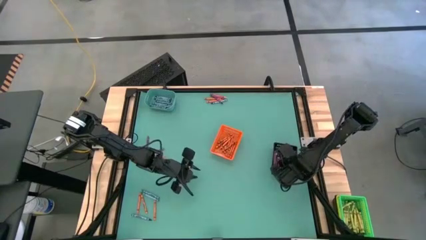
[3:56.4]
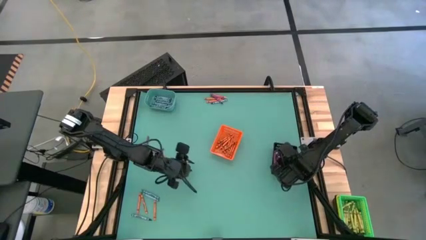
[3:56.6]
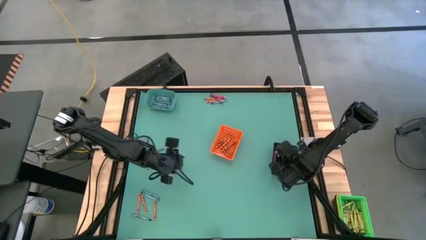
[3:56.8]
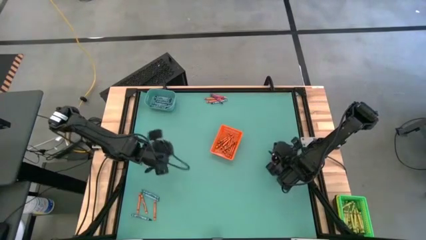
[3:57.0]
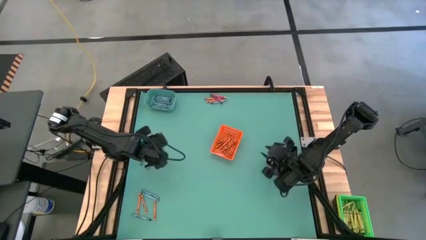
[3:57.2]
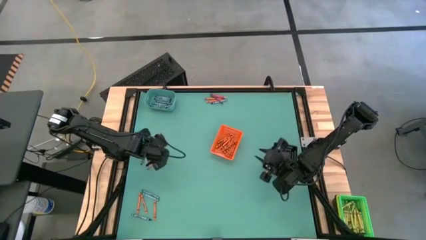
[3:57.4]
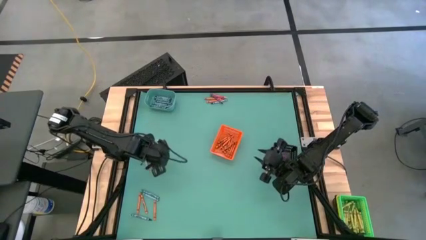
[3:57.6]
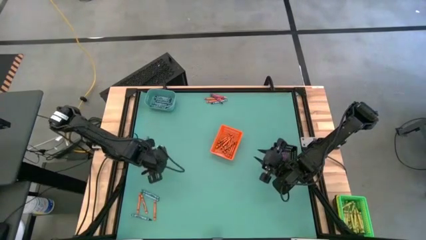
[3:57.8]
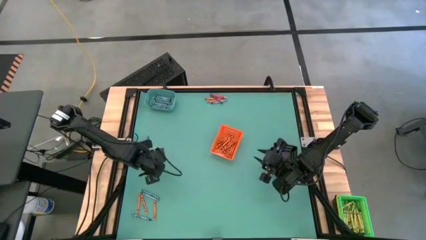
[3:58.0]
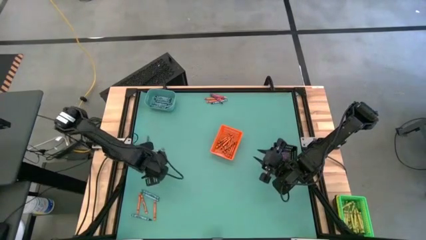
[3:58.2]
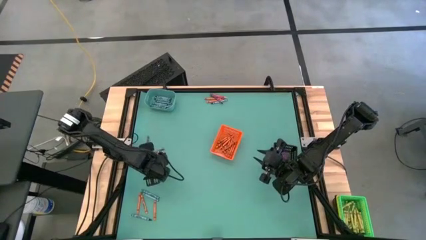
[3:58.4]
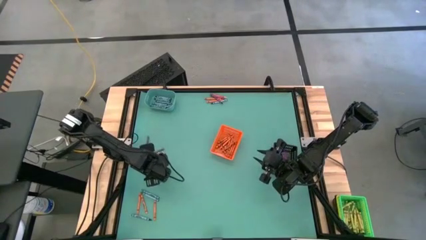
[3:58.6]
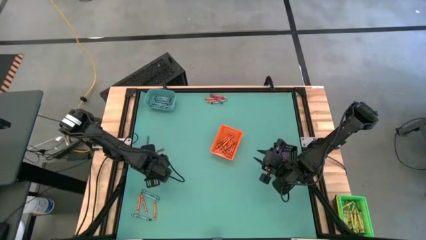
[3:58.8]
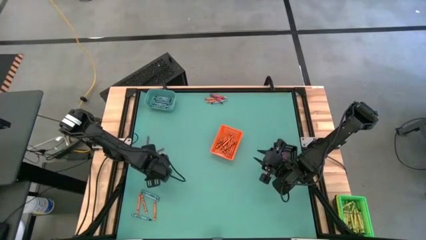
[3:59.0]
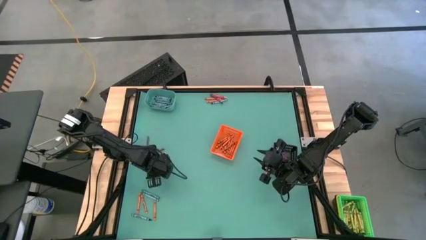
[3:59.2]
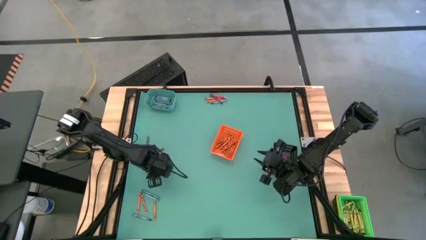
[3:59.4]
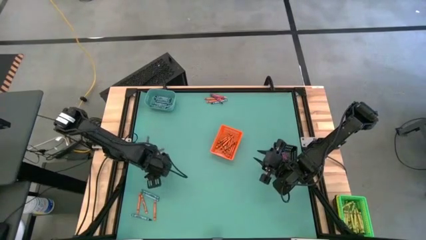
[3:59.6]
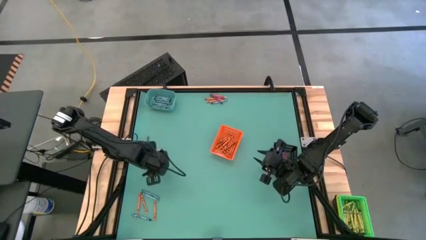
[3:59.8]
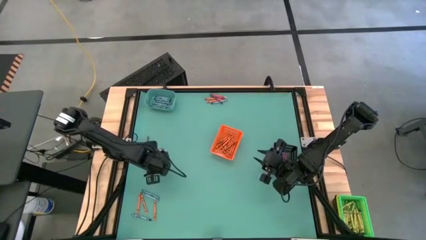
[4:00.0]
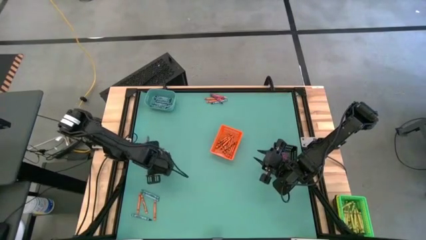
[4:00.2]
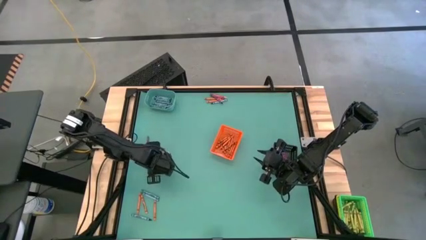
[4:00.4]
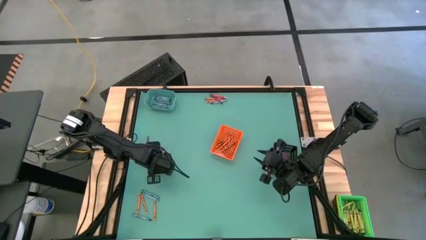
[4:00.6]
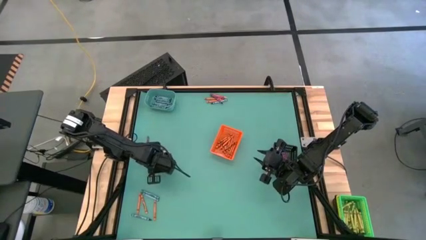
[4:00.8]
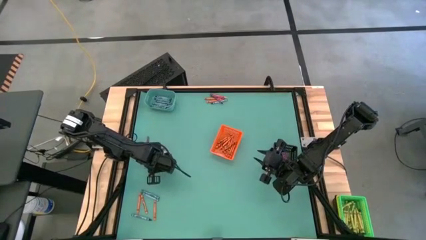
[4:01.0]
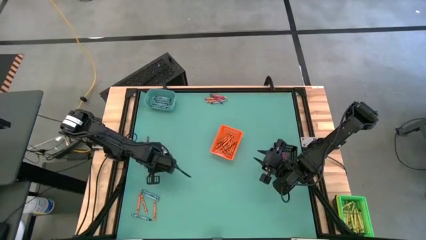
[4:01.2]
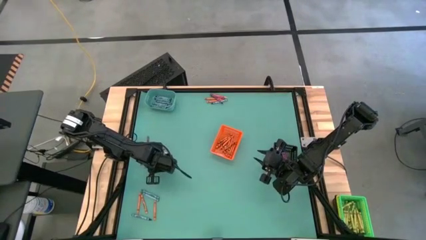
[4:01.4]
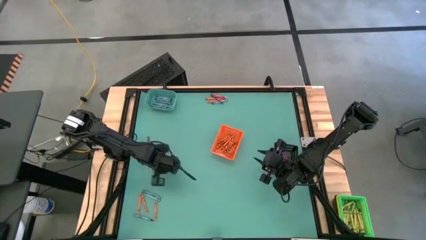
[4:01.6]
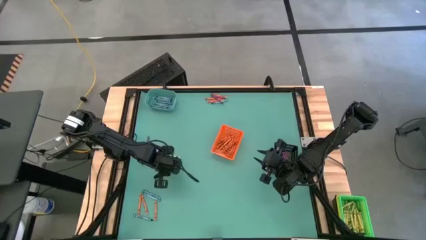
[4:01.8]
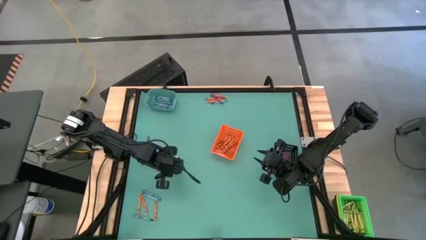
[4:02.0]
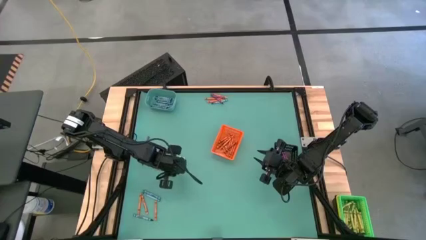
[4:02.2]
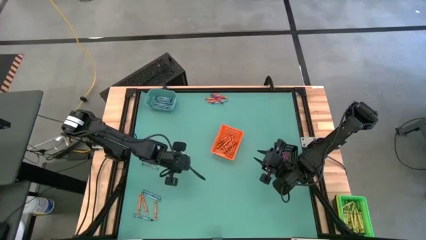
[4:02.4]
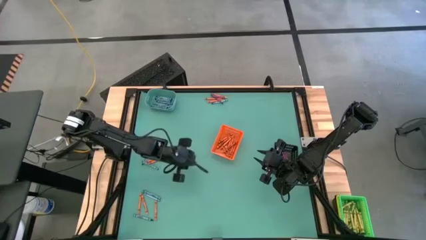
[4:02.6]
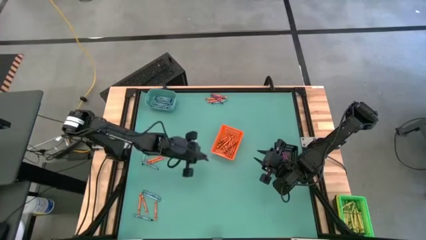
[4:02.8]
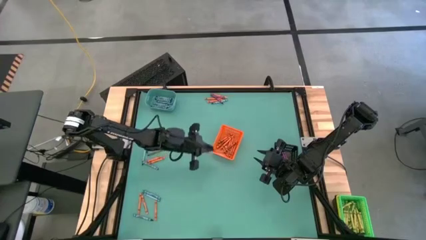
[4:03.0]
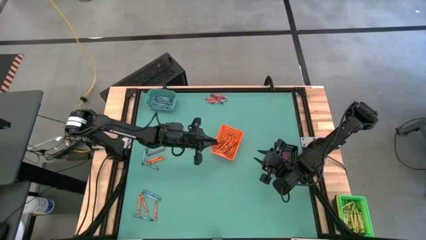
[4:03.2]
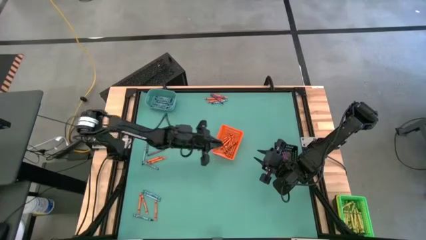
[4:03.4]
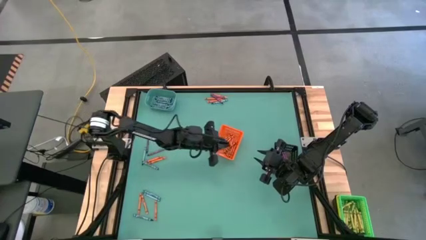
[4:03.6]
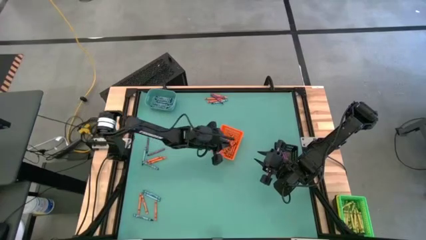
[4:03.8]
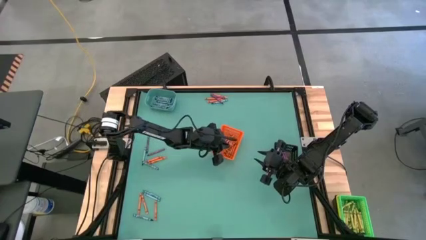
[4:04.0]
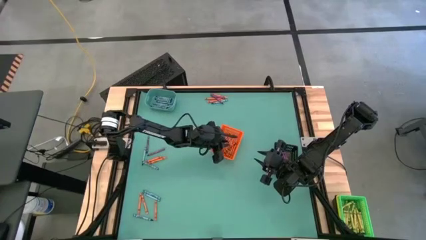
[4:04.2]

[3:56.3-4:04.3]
Task: Sort crayons
Put the orange crayon into the orange bin

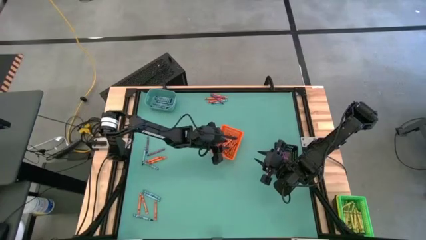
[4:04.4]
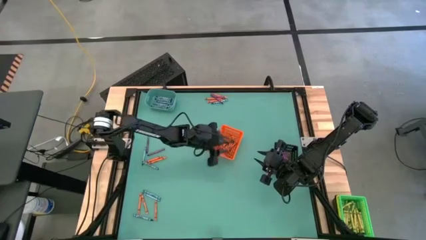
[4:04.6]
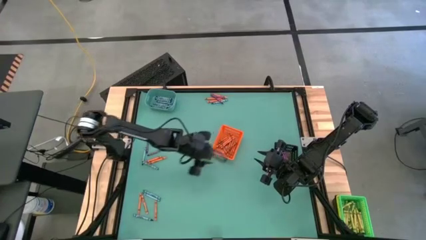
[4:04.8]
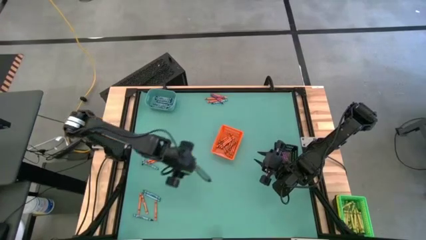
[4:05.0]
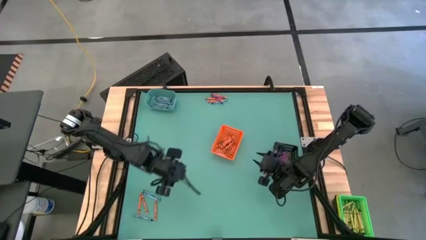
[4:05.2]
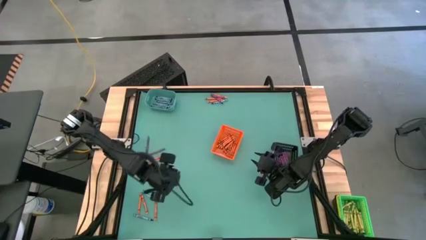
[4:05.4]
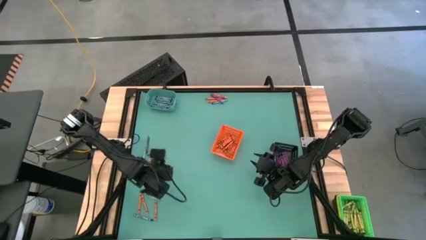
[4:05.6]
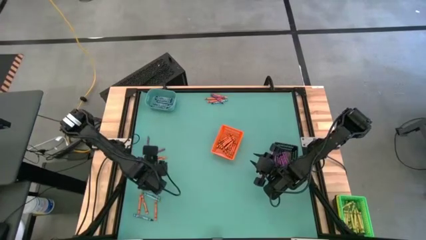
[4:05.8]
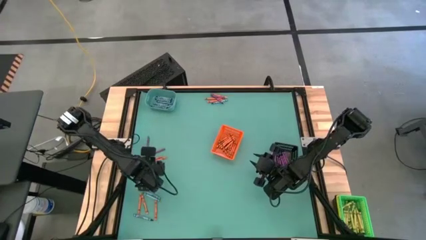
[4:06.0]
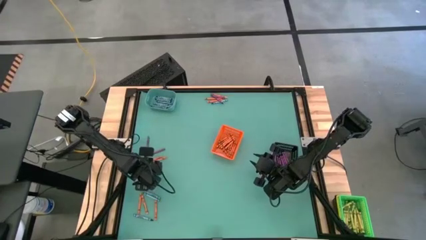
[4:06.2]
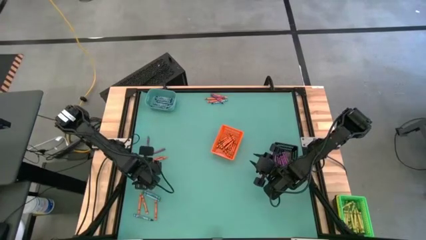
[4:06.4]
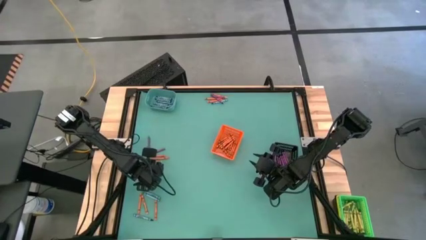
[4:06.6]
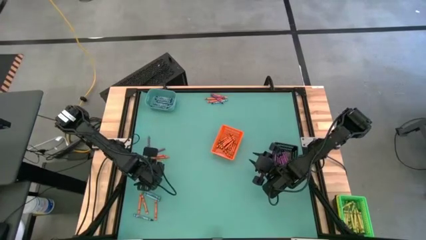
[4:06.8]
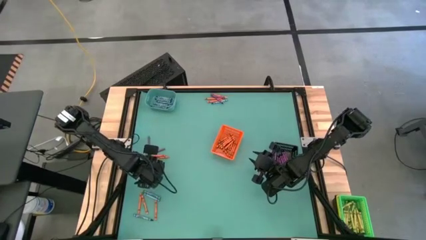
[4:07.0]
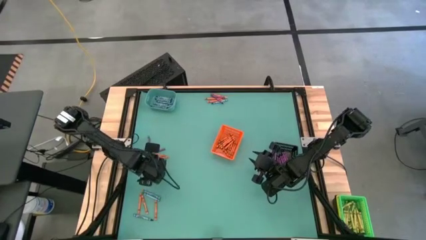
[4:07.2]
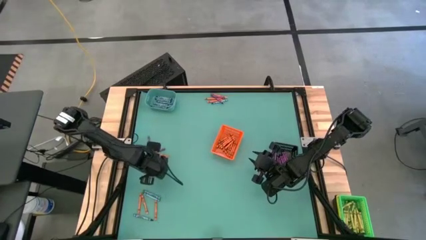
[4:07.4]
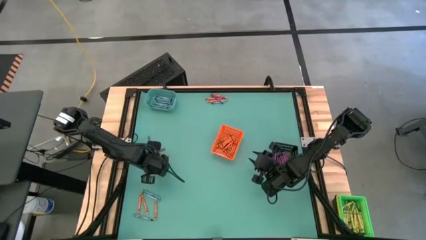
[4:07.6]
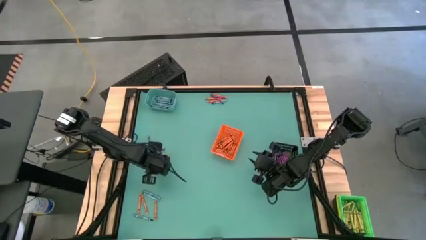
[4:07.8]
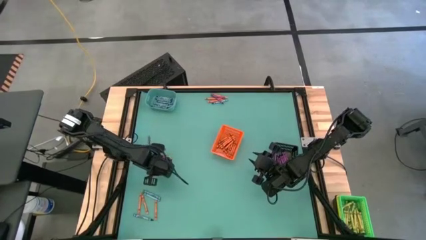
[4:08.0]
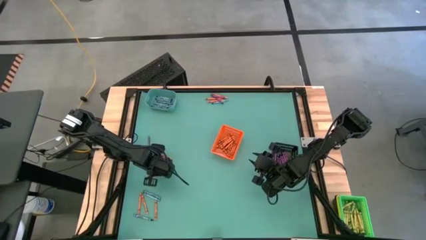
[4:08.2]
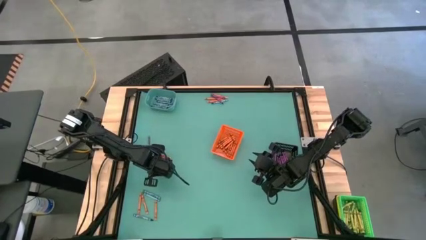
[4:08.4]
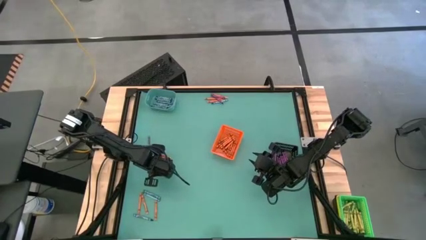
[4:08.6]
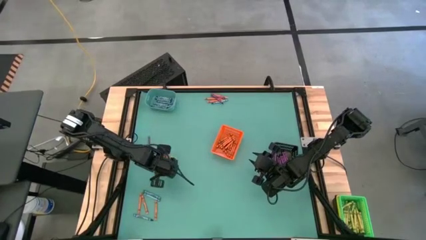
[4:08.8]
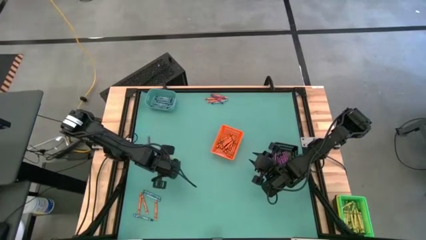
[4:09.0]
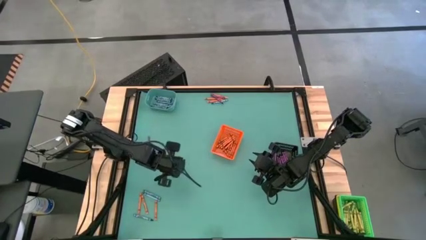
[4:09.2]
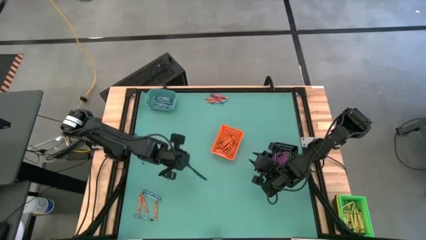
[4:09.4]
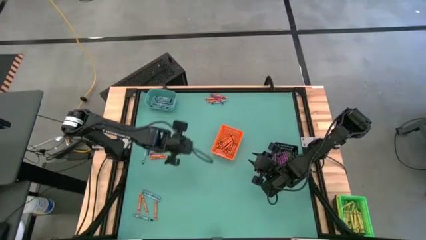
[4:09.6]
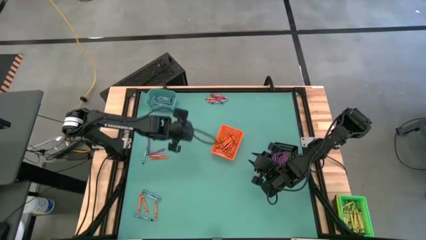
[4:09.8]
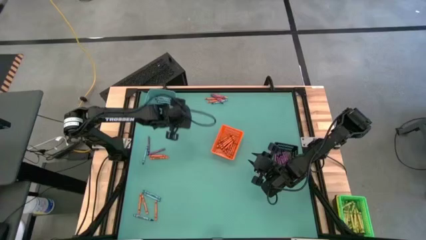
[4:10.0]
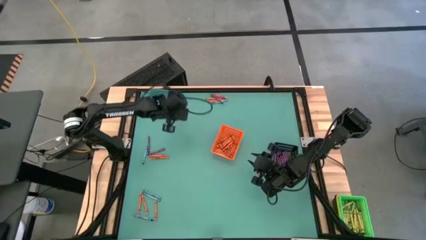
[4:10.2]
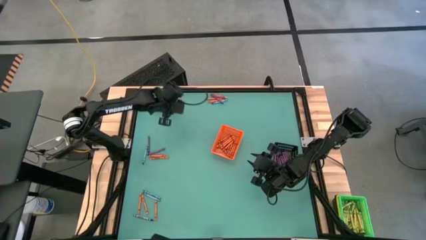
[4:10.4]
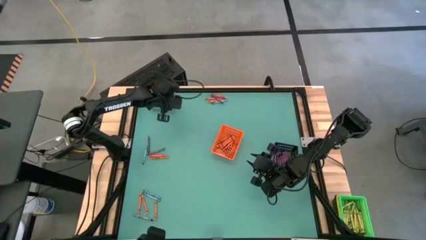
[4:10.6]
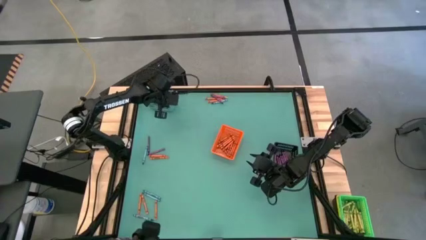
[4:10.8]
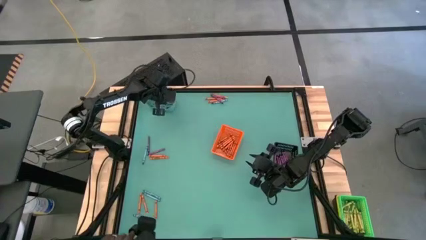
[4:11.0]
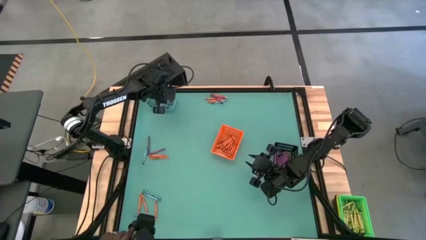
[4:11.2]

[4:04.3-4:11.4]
Put the blue crayon into the blue bin
